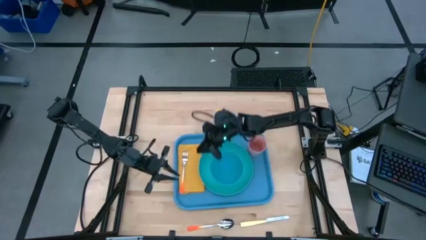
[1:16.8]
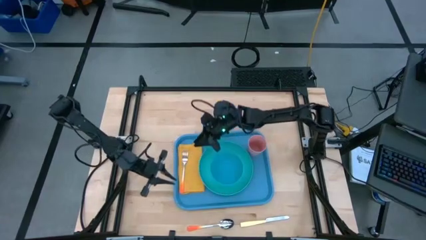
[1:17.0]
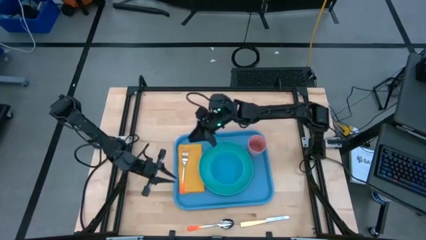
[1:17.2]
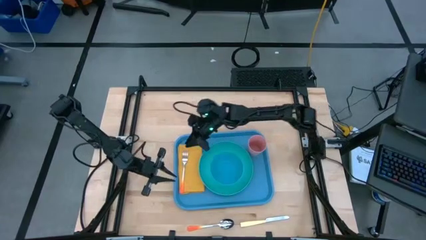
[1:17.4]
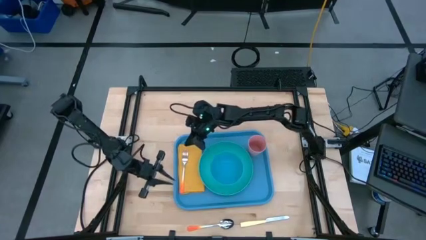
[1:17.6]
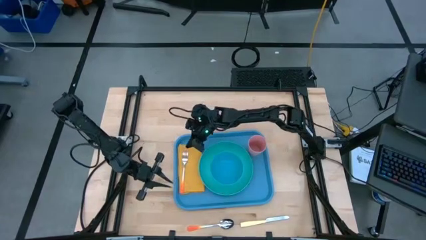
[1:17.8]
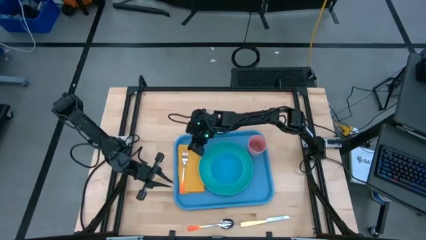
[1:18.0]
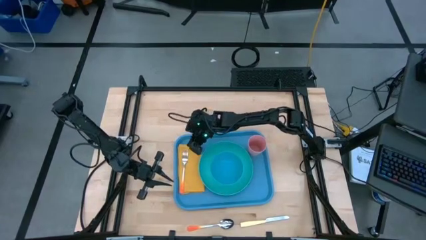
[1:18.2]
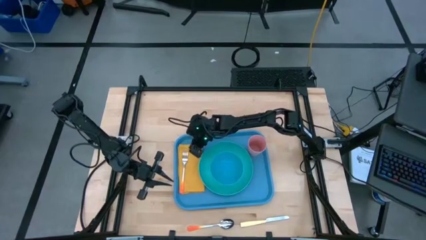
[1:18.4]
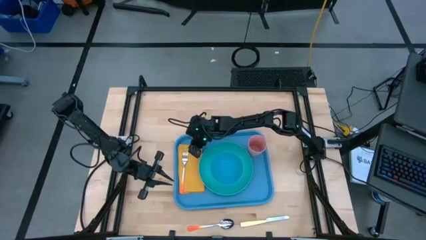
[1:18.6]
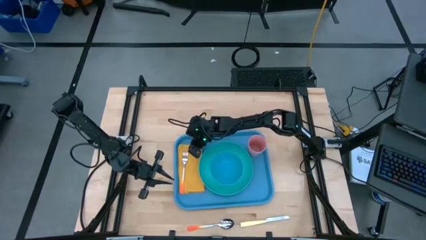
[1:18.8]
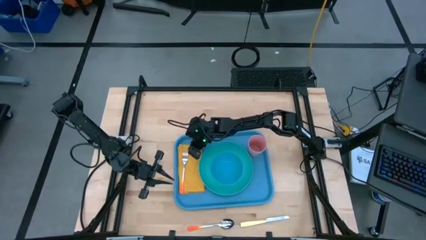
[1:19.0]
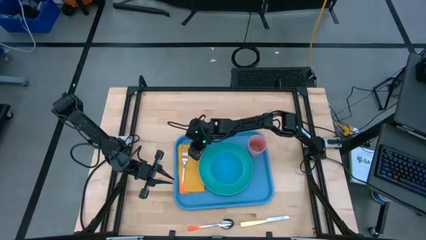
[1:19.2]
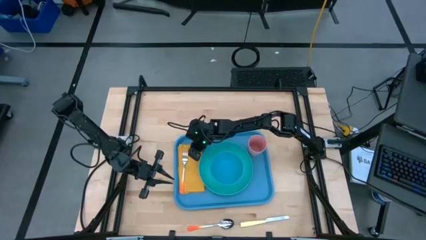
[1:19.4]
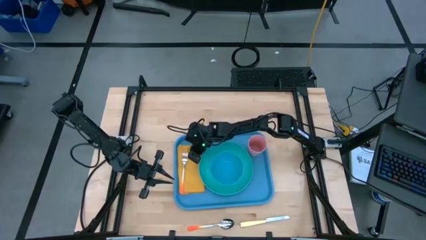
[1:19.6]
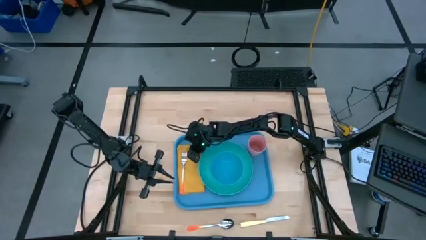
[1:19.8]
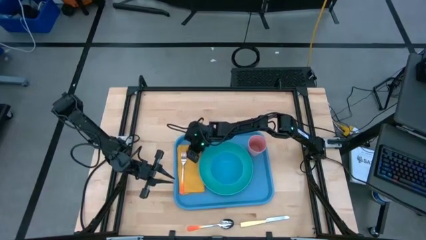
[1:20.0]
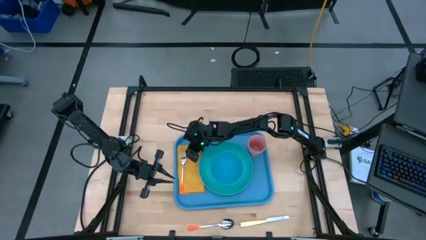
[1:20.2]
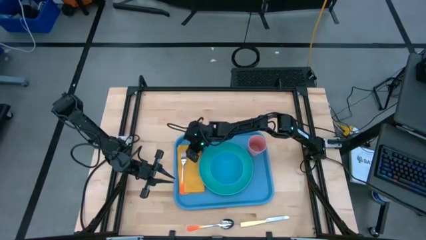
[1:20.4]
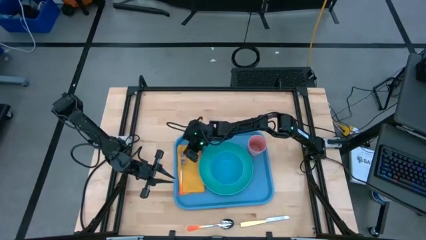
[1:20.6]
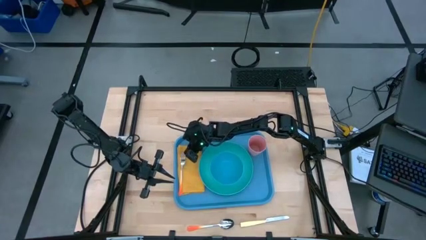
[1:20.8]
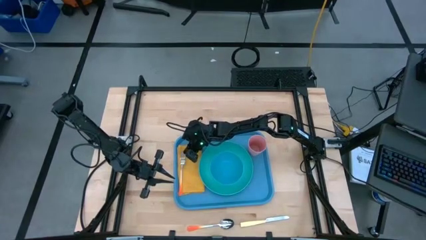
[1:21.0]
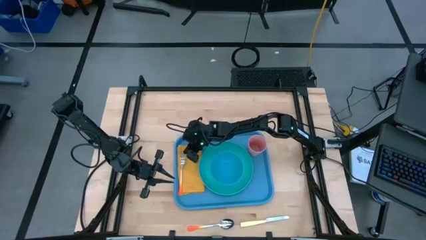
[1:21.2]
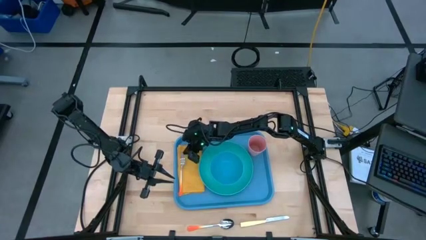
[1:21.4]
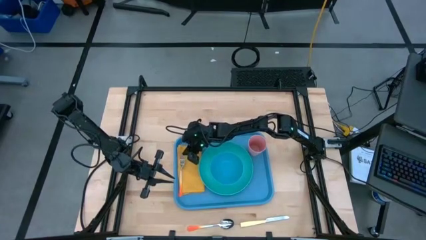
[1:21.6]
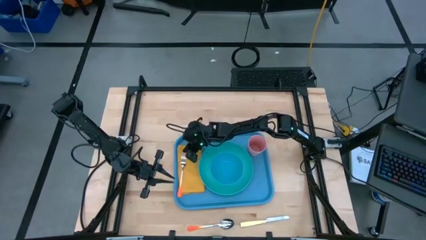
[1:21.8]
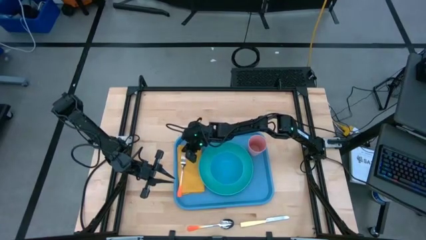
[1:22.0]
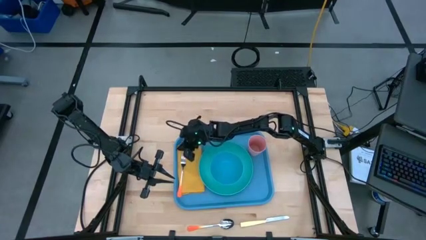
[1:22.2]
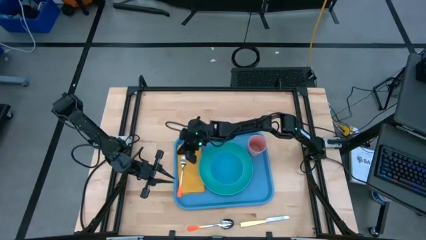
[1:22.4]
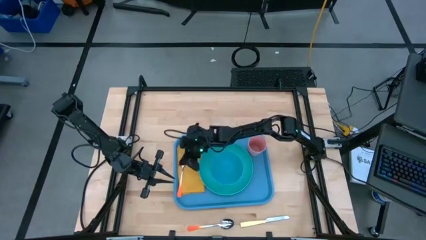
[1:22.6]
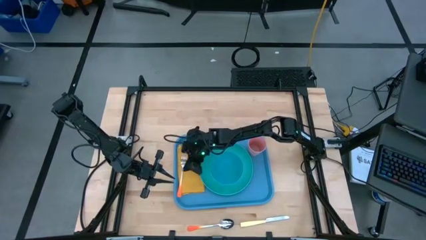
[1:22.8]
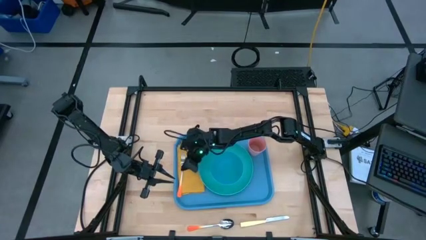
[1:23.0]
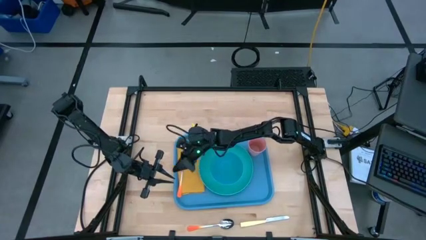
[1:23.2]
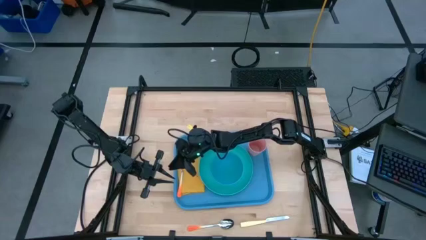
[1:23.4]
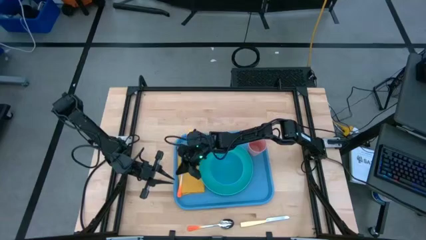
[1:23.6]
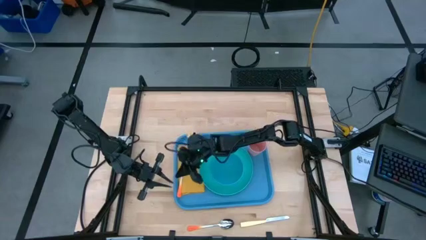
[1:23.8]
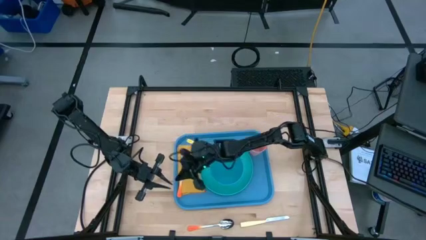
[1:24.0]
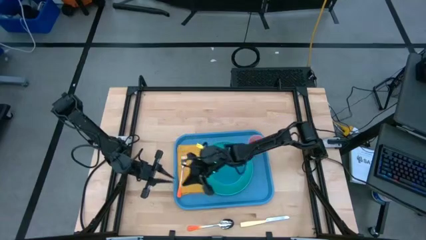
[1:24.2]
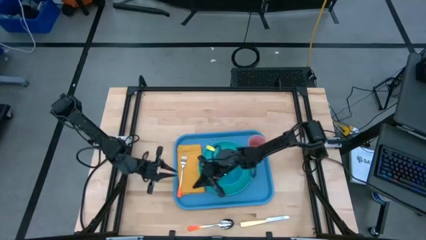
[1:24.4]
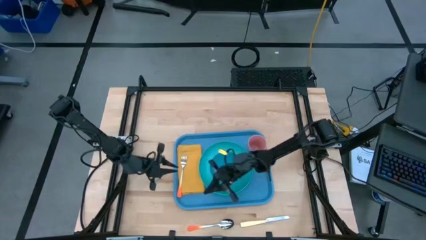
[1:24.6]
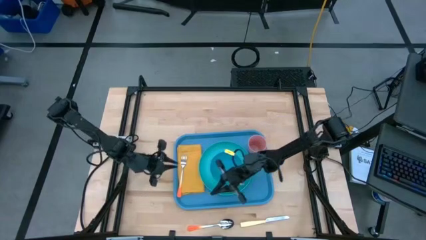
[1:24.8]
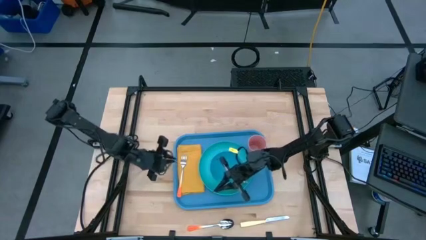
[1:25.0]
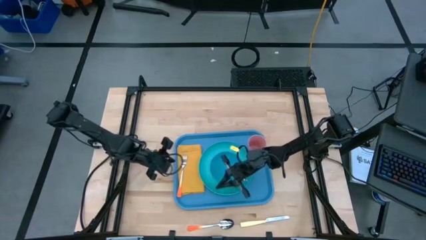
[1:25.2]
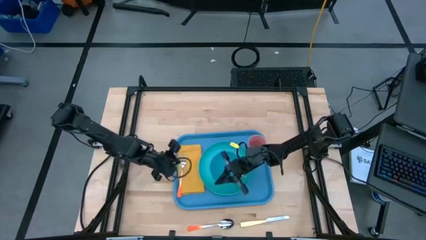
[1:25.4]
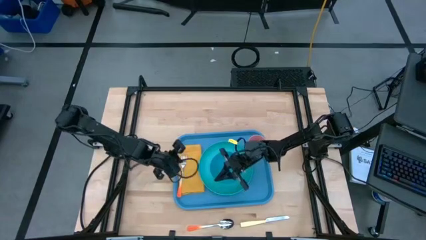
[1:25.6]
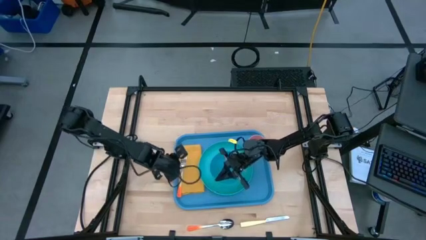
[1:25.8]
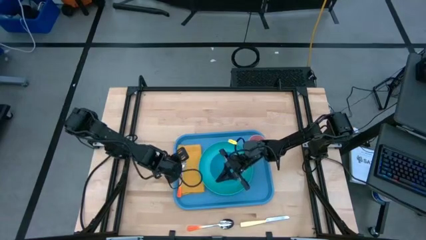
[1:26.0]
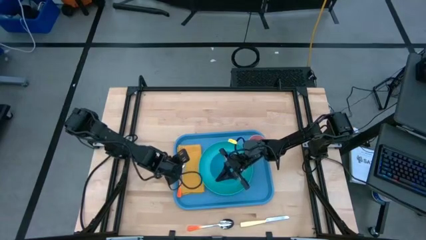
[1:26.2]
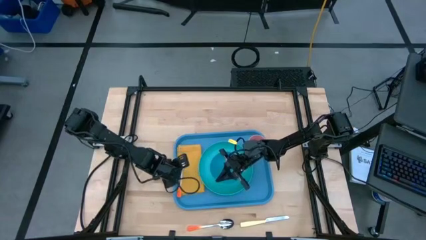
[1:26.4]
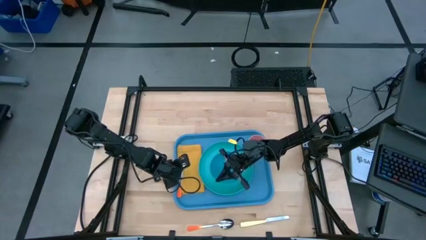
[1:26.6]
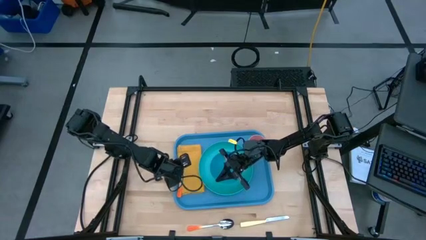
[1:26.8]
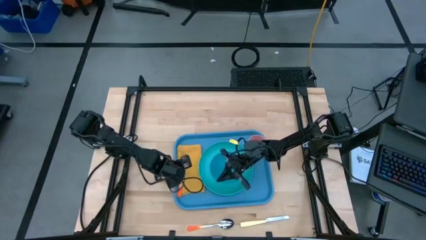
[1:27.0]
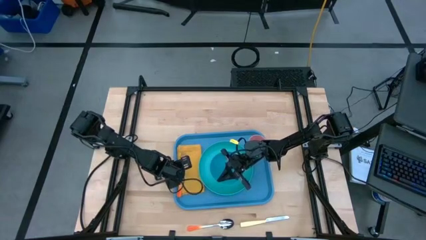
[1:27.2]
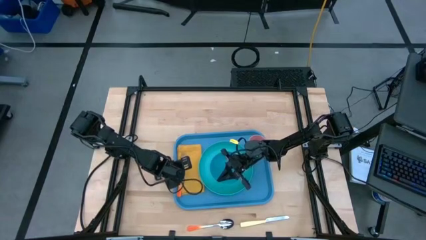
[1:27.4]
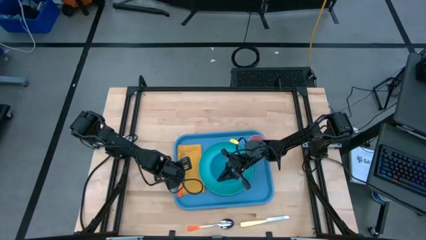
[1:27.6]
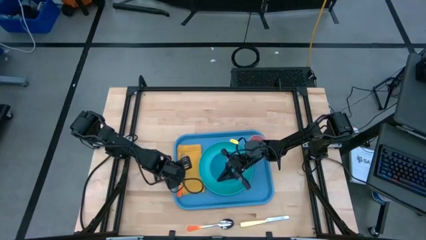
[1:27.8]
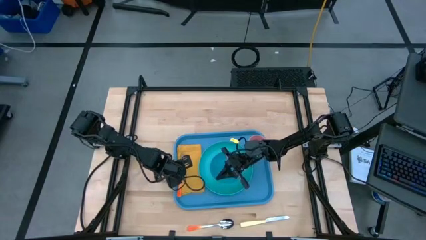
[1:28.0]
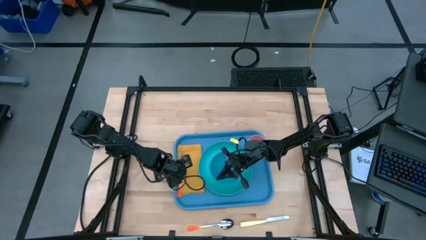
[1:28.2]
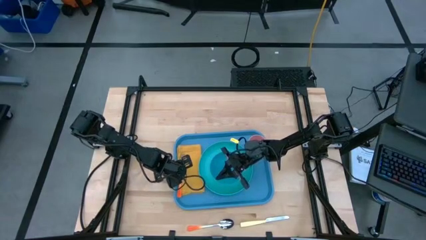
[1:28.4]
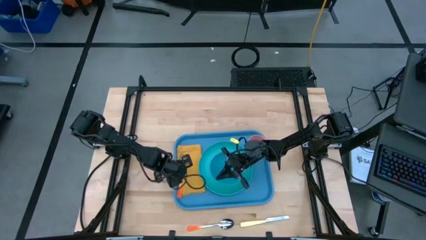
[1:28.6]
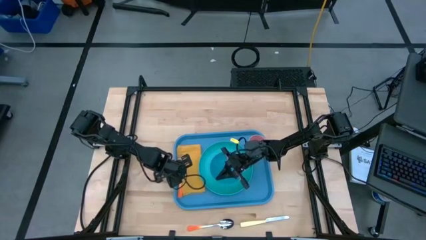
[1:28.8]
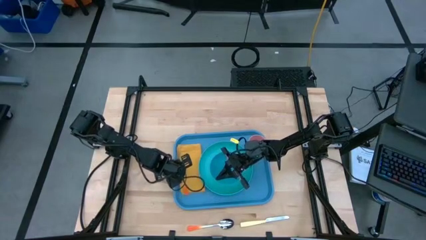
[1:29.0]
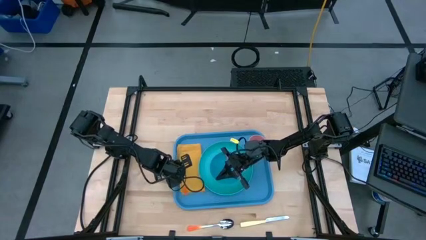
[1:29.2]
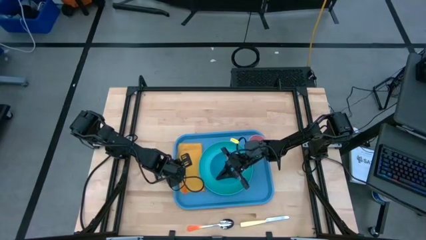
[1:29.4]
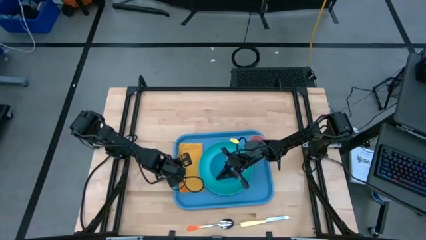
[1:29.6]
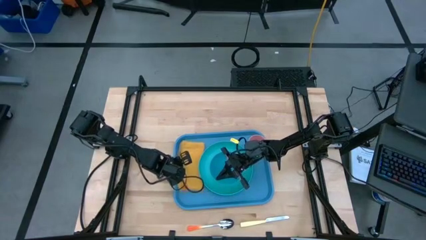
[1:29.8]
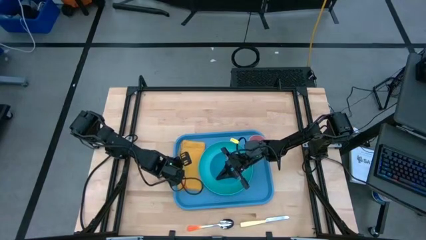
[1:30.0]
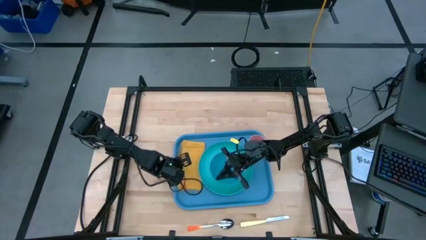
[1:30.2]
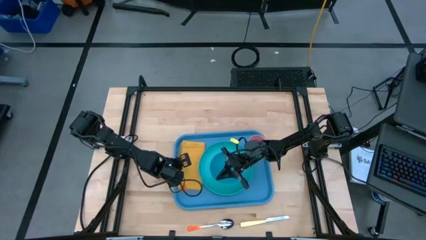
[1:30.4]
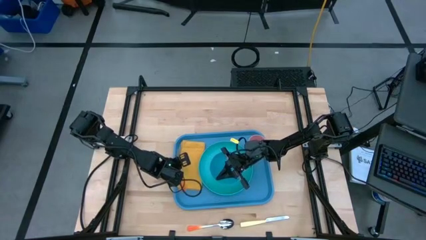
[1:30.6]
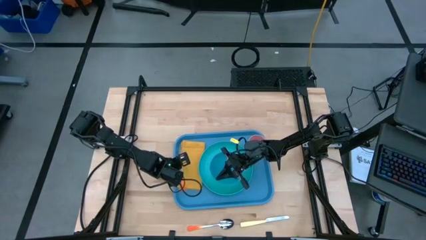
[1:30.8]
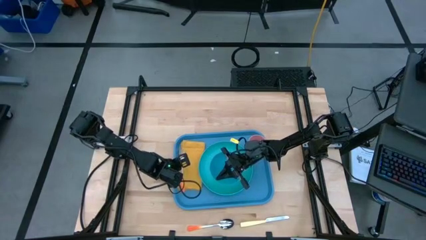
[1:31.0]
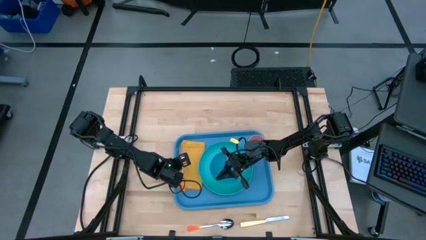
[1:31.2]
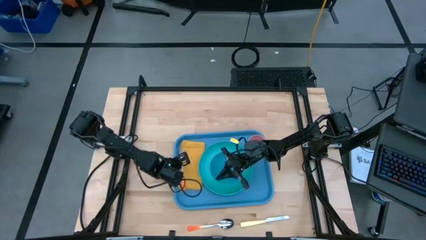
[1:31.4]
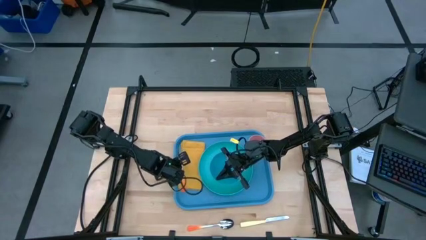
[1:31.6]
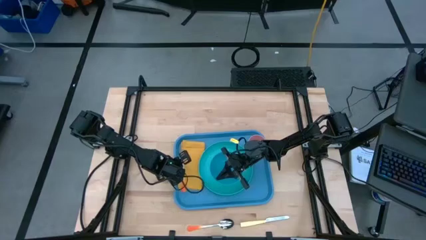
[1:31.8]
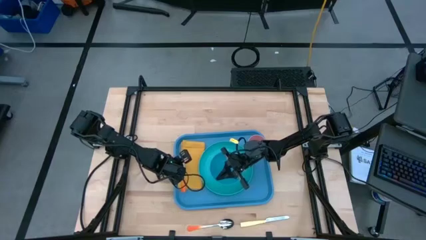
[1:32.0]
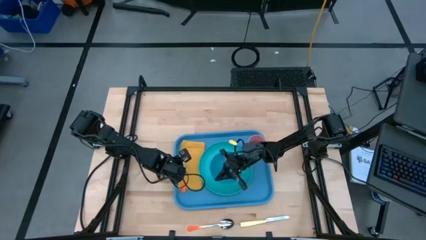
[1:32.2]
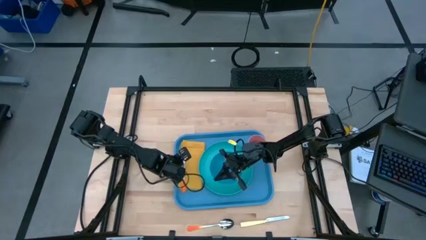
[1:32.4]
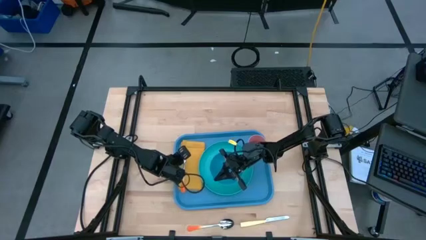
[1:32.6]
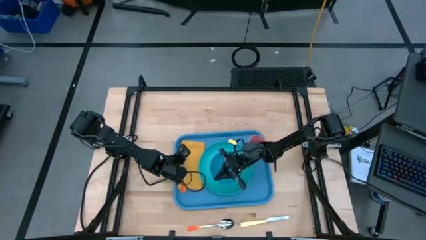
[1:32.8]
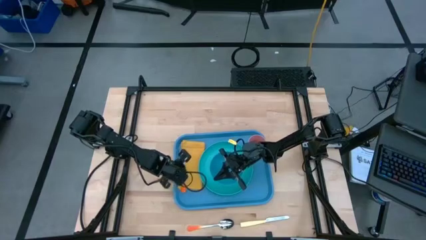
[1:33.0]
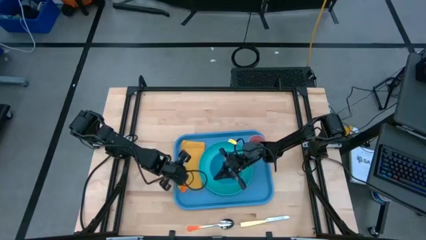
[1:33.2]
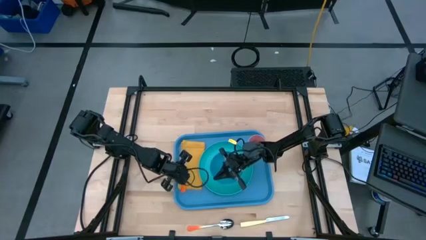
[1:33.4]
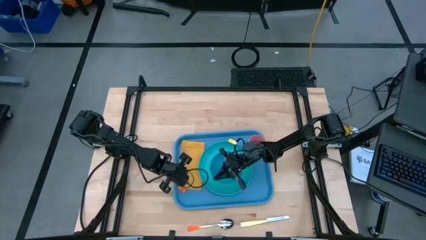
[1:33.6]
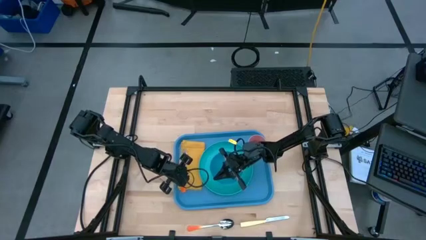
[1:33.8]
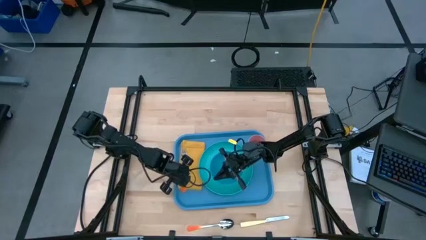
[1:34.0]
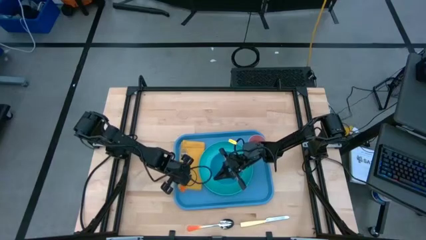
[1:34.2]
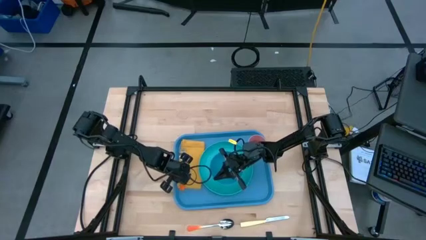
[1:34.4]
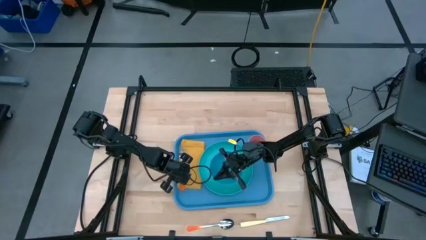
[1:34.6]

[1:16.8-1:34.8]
Task: Set up tray
Put the orange fork on top of the yellow napkin
